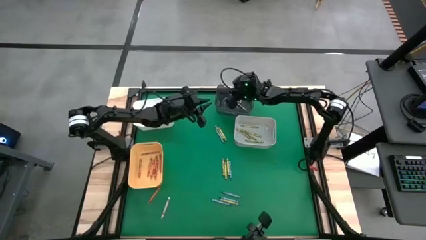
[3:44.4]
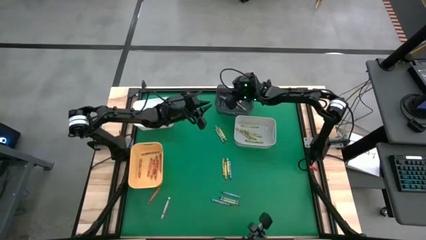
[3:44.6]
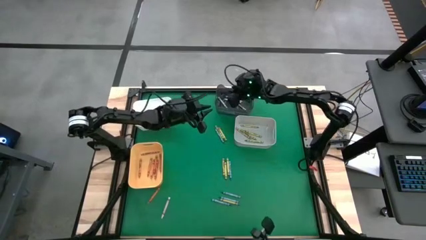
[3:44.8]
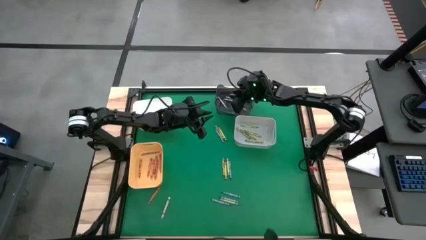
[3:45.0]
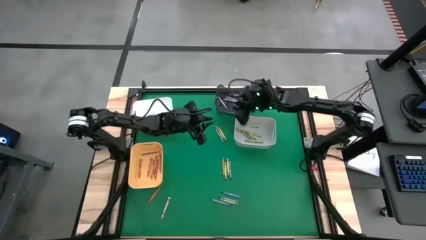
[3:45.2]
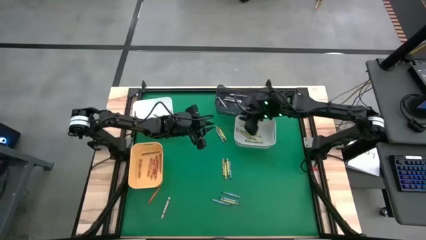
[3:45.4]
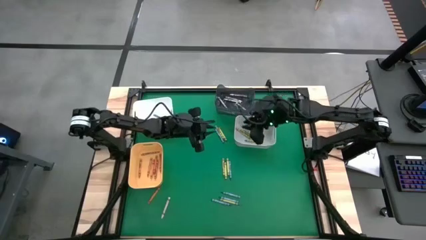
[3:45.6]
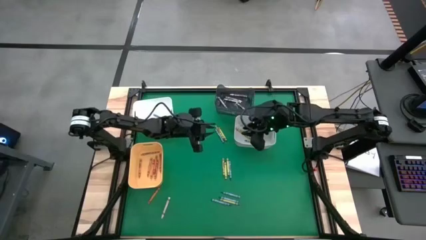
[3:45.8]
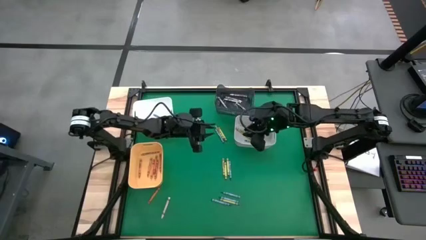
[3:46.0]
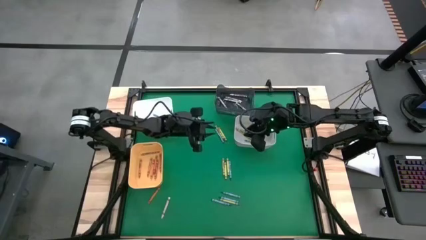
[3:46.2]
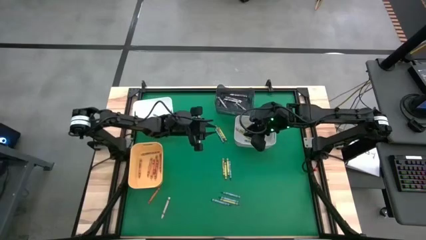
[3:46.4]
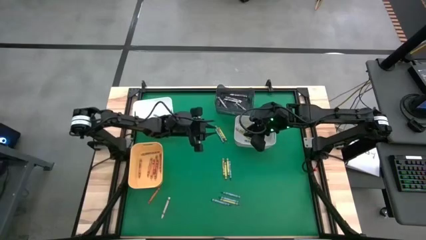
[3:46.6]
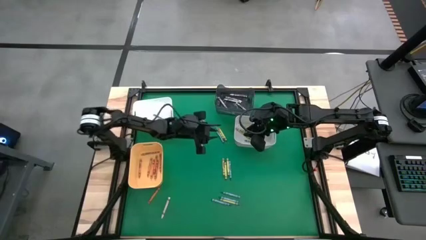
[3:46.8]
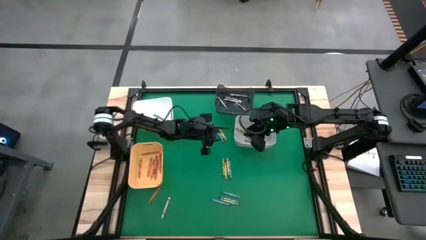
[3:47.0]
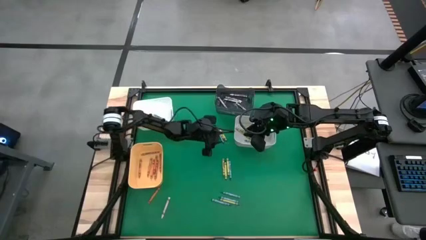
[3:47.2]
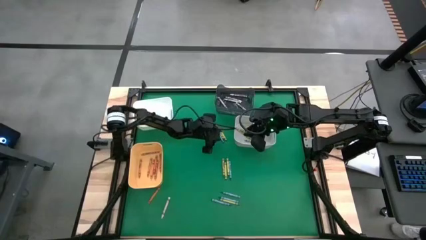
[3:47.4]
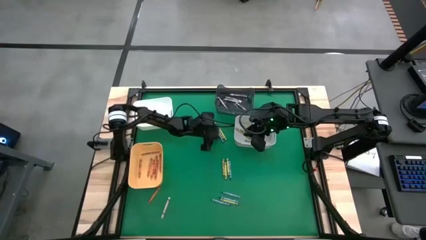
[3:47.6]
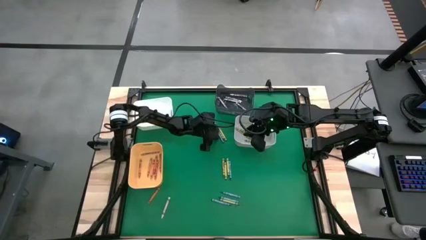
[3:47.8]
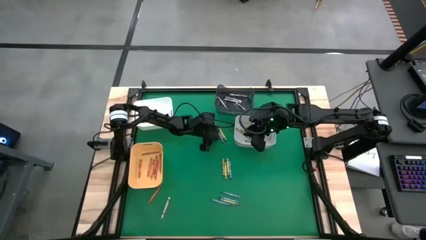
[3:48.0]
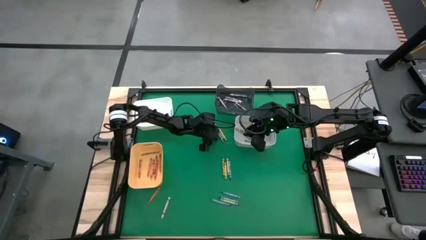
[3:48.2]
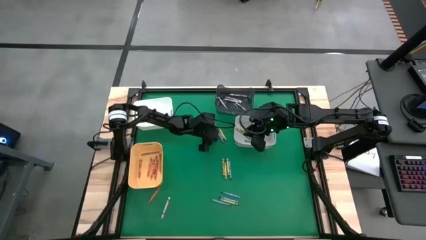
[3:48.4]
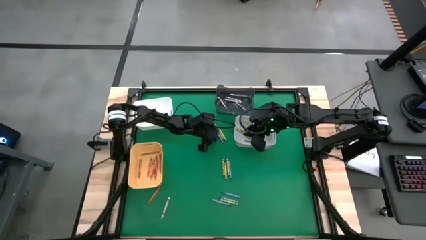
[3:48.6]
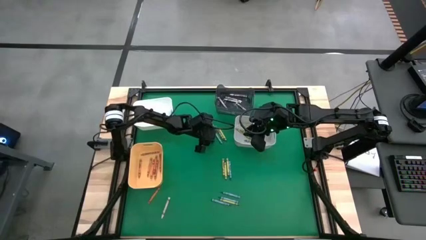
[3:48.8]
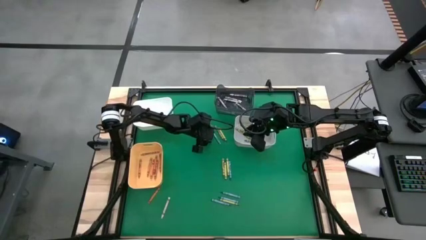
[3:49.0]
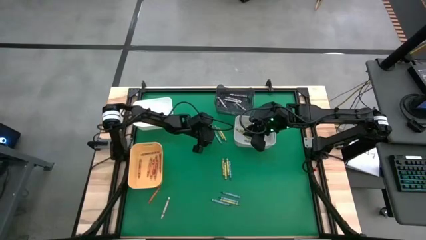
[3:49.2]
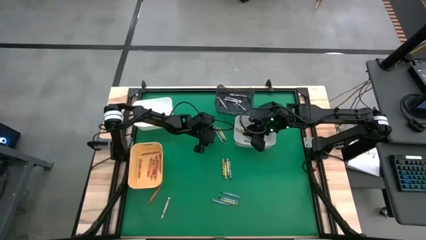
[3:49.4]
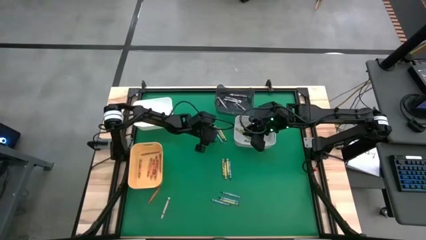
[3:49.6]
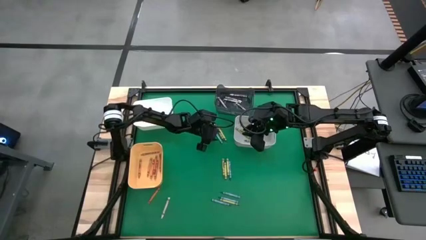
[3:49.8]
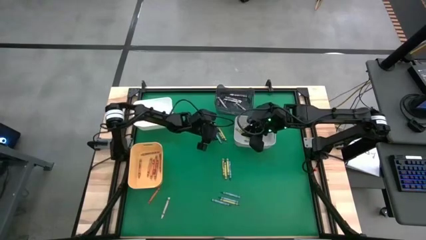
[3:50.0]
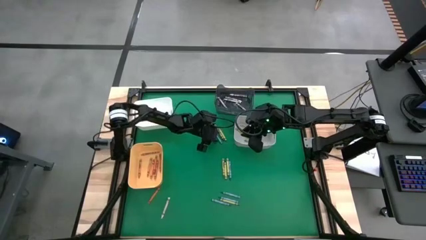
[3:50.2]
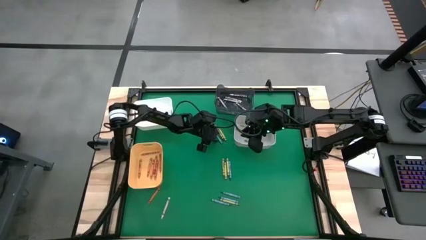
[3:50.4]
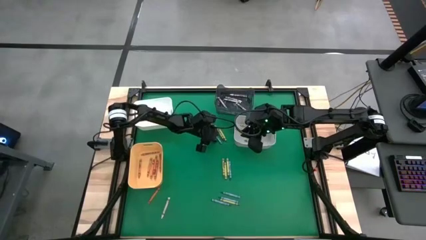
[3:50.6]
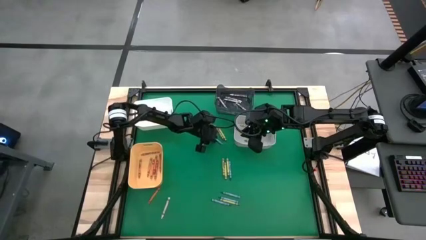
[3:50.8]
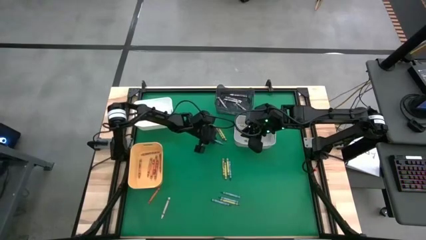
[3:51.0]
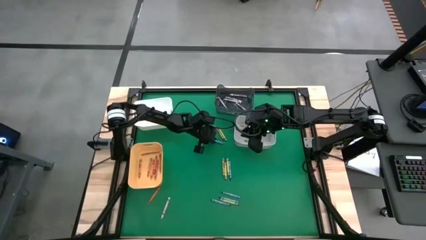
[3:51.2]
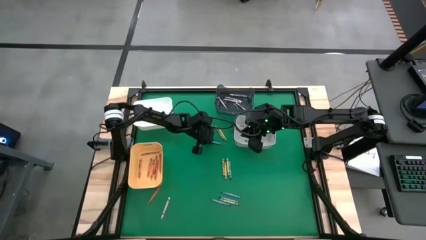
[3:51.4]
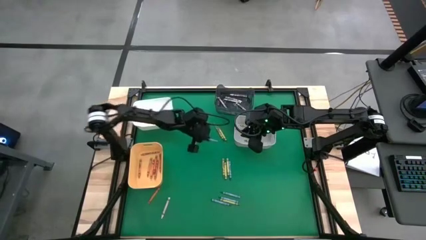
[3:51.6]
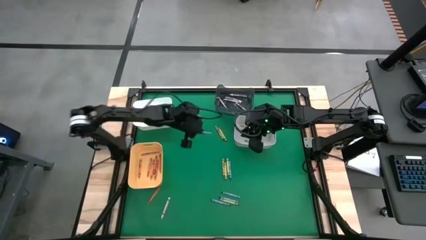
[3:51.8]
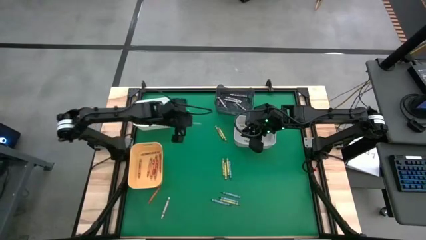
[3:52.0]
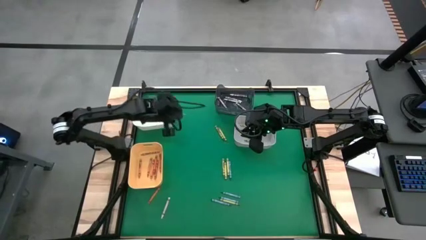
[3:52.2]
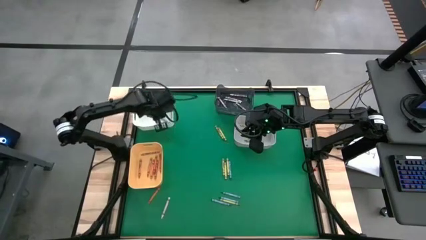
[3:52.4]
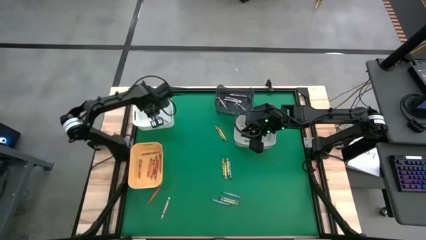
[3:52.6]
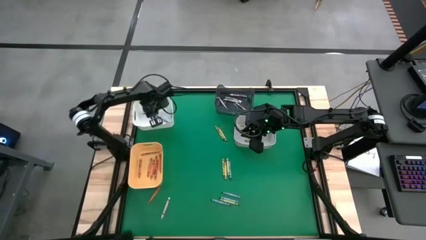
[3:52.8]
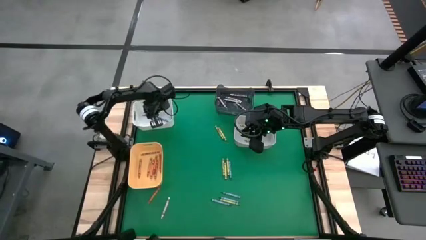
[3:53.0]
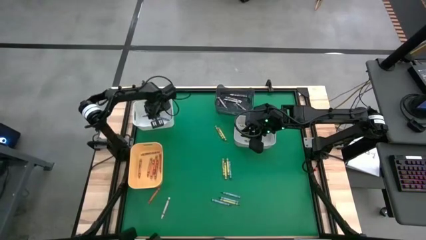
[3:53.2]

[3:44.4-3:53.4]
Task: Sort crayons
Put the blue crayon into the white bin

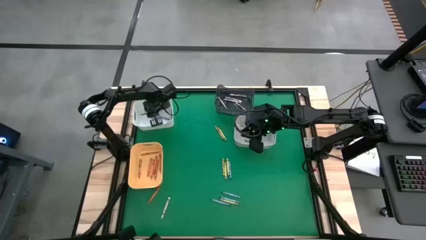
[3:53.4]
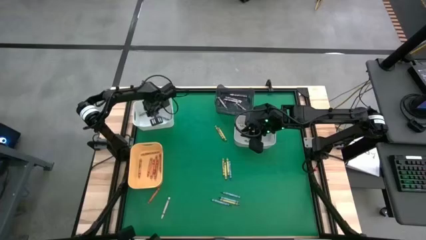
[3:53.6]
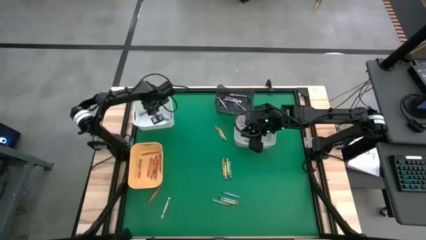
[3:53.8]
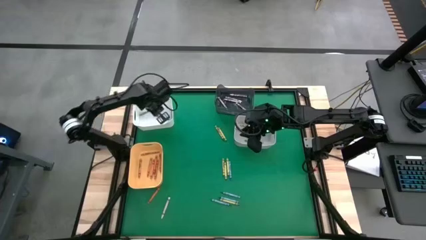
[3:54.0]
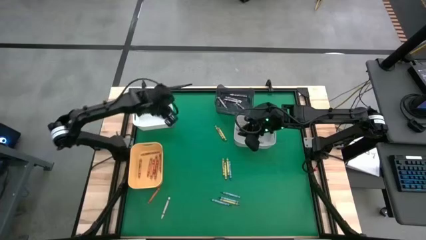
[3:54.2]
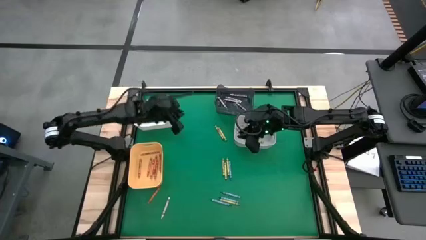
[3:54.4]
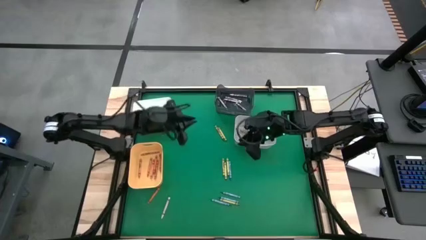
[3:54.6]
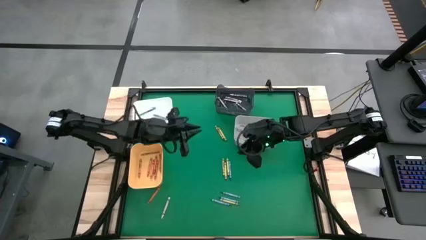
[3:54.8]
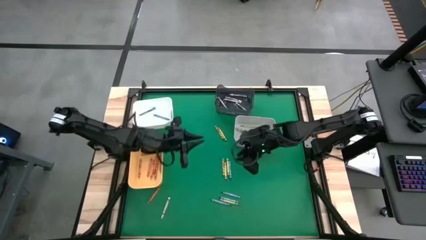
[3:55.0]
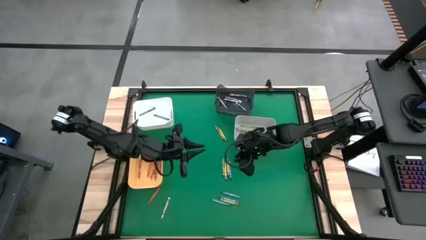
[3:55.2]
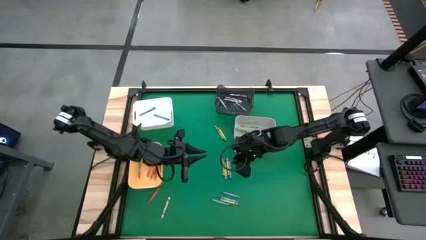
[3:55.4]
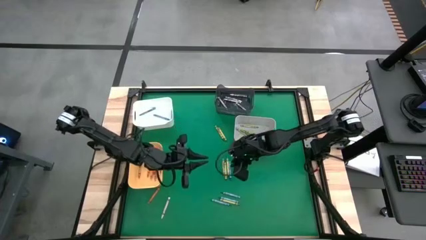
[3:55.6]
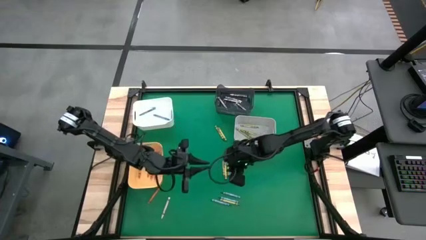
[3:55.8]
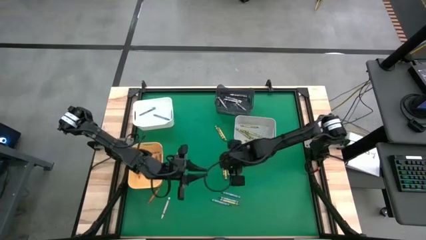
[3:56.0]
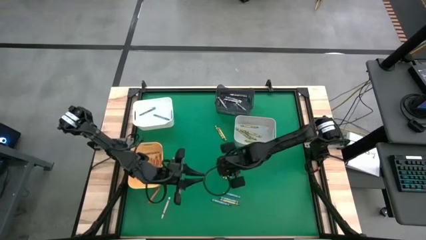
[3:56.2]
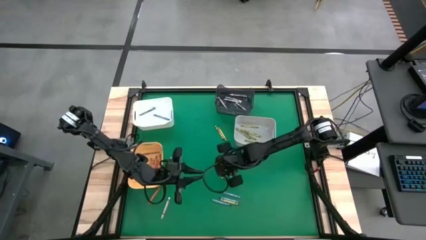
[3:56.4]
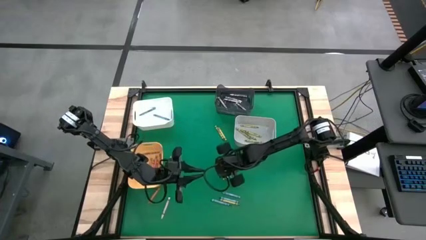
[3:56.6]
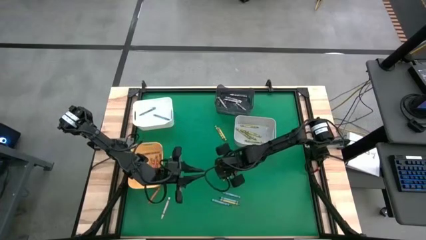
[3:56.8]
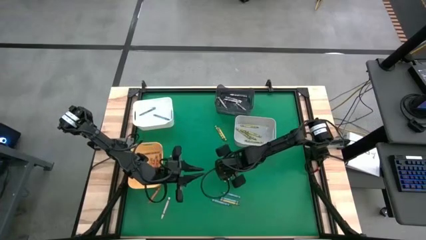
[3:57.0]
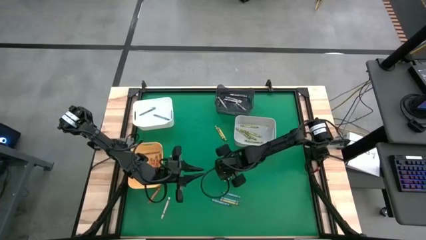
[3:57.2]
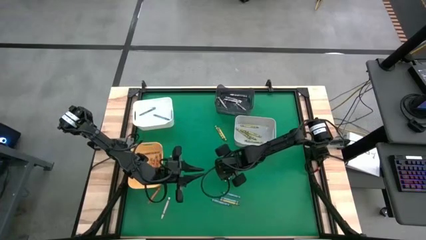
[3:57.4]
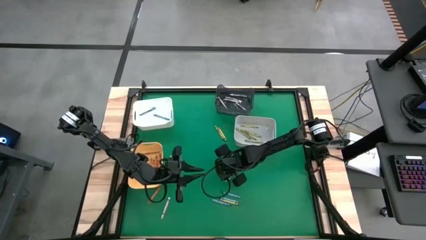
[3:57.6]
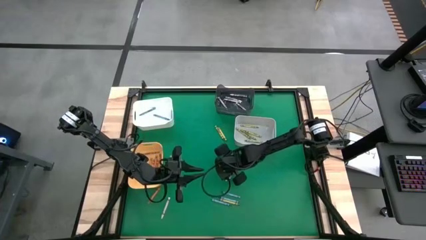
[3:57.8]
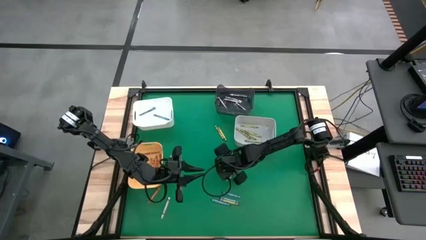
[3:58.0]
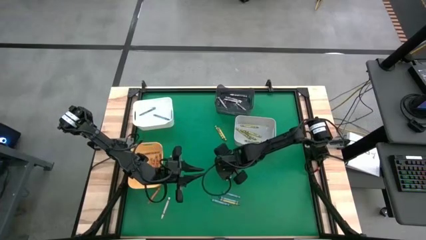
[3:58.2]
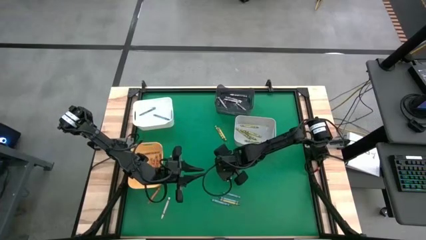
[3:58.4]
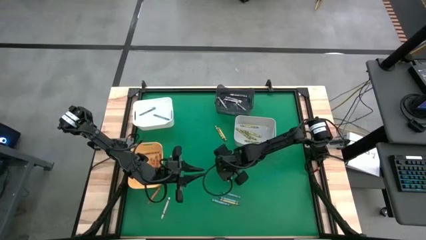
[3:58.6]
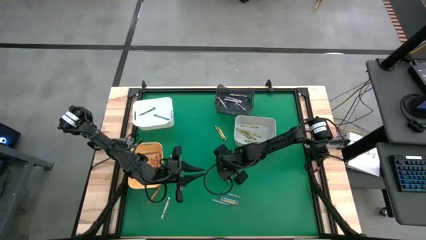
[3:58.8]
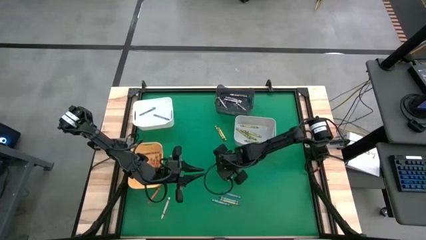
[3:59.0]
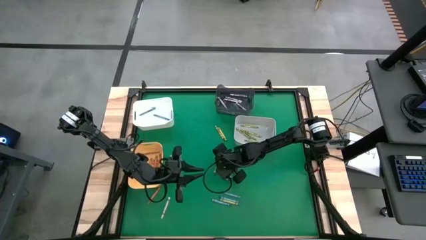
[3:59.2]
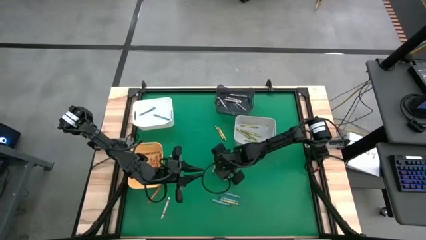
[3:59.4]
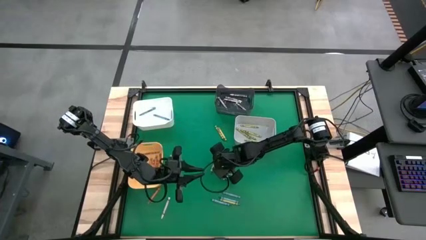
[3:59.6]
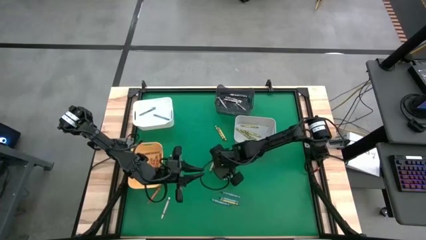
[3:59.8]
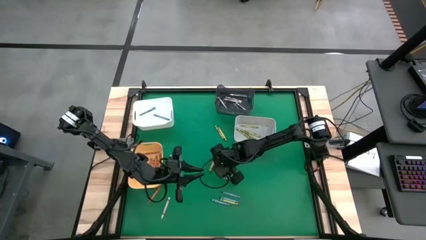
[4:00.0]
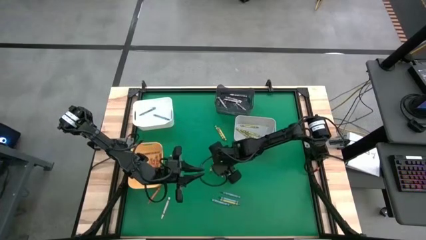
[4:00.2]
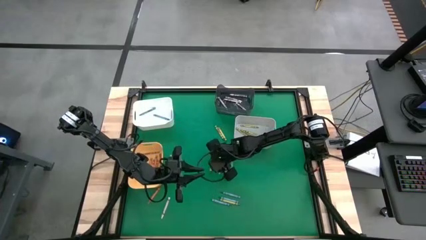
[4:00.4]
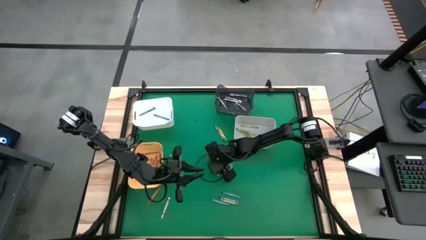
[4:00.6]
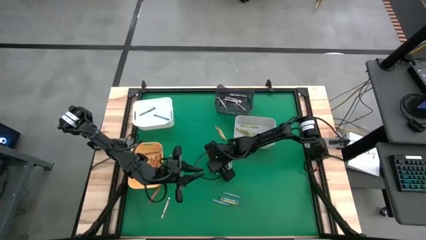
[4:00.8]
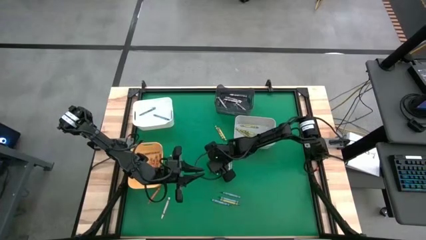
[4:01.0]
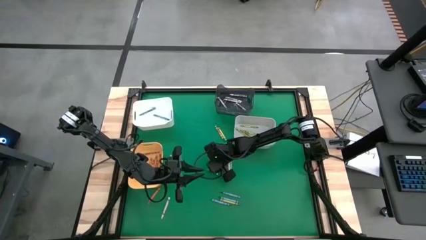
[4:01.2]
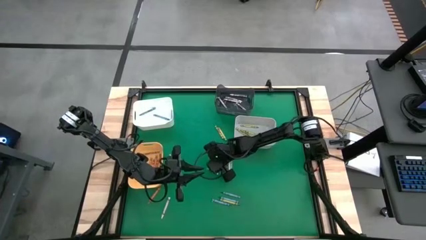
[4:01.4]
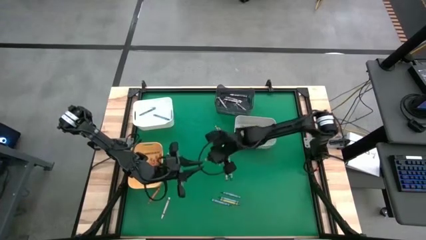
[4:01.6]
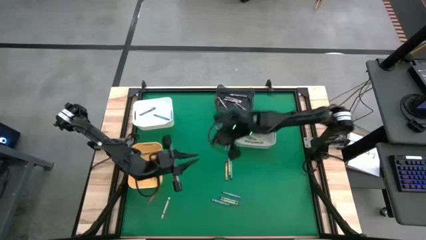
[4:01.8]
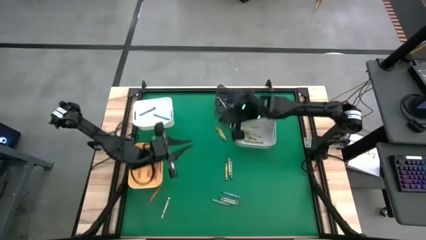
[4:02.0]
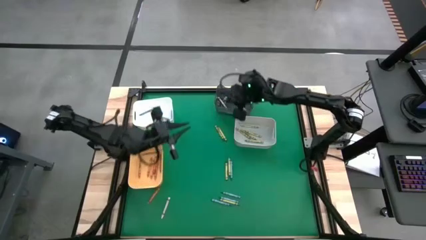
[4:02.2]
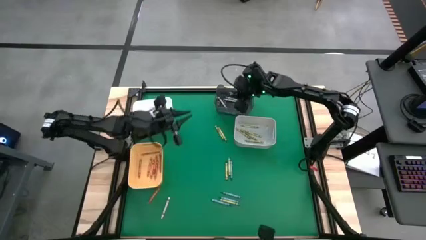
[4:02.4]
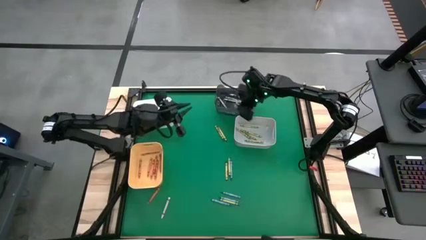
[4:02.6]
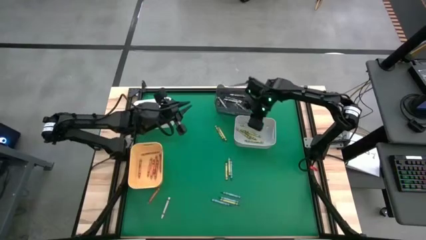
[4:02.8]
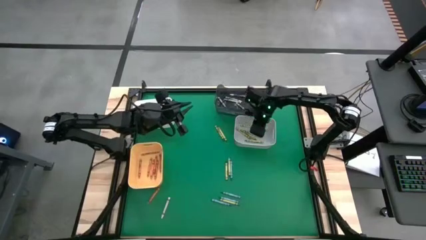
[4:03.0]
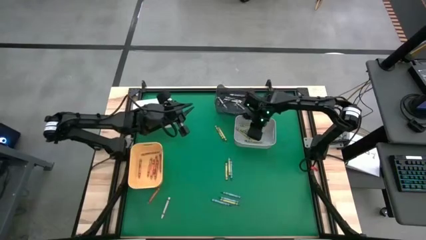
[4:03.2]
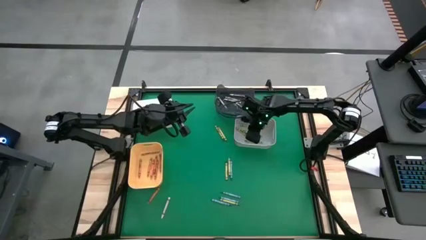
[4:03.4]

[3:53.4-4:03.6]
Put the green crayon into the gray bin
